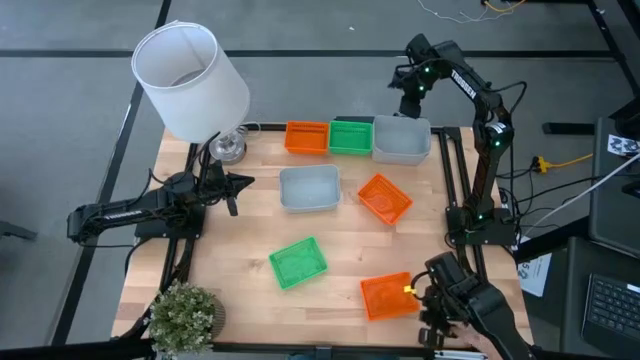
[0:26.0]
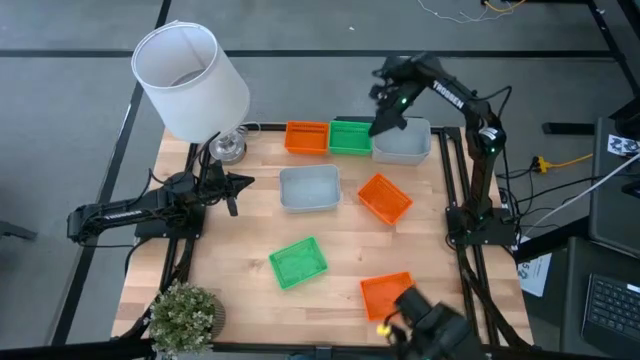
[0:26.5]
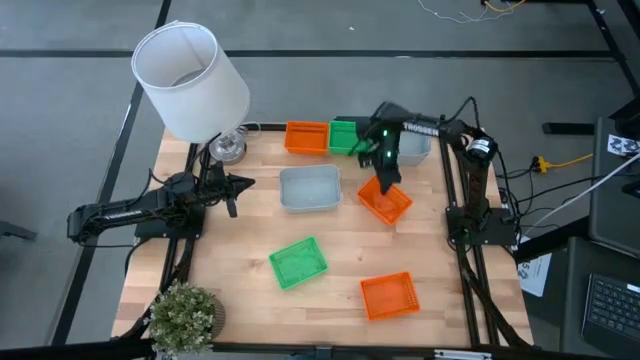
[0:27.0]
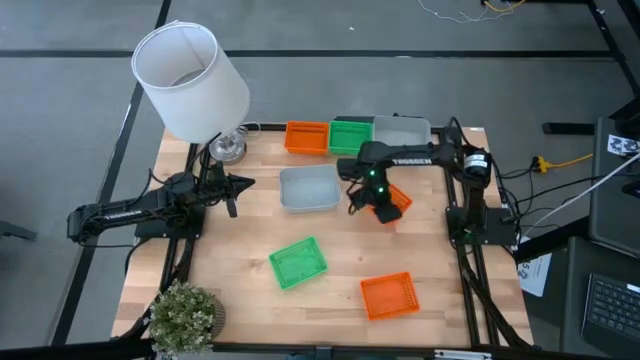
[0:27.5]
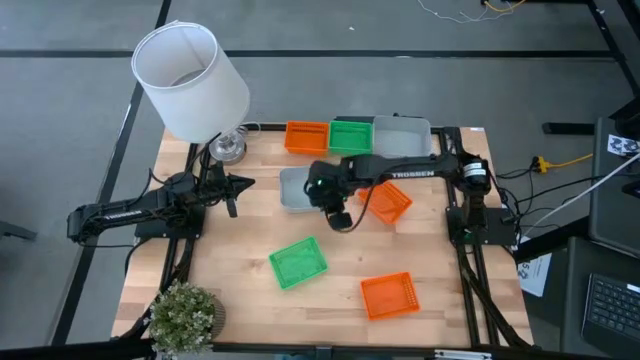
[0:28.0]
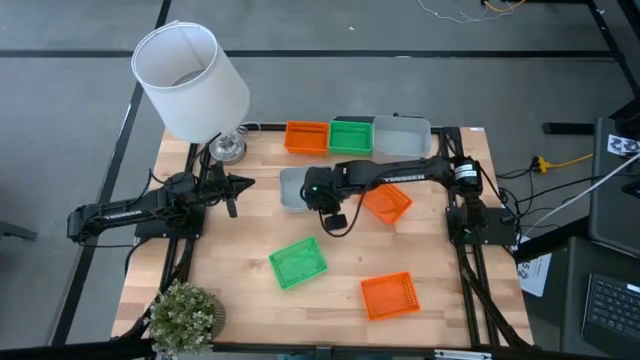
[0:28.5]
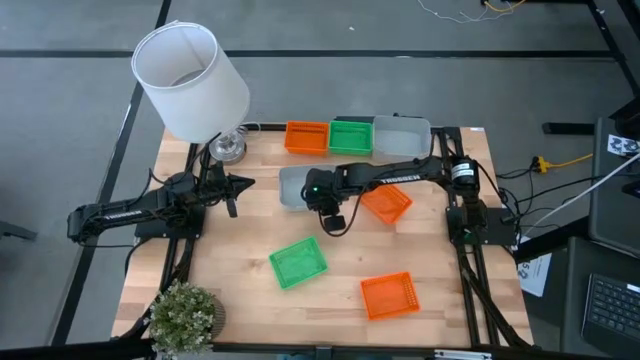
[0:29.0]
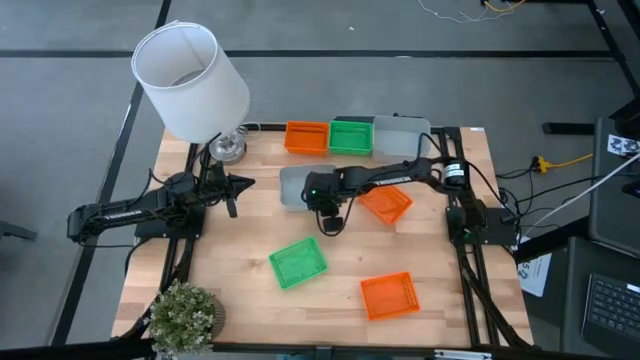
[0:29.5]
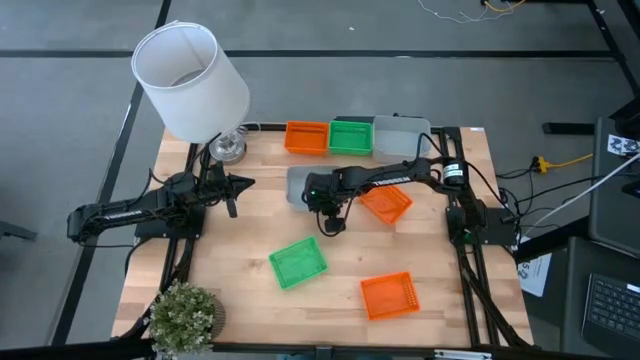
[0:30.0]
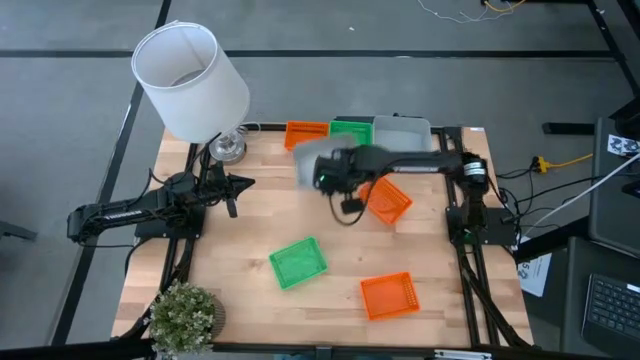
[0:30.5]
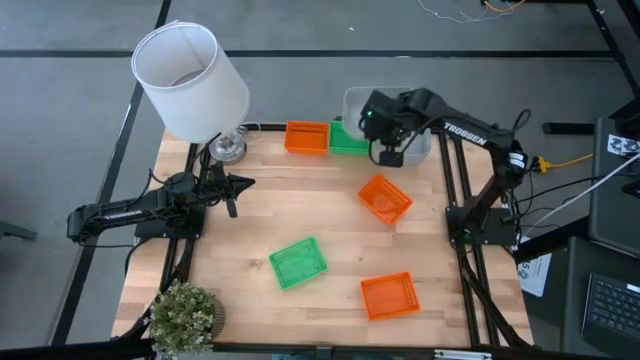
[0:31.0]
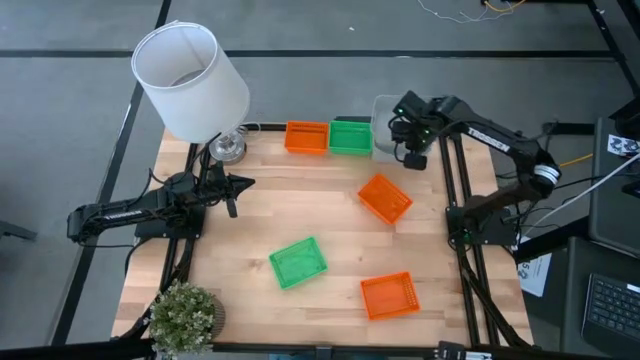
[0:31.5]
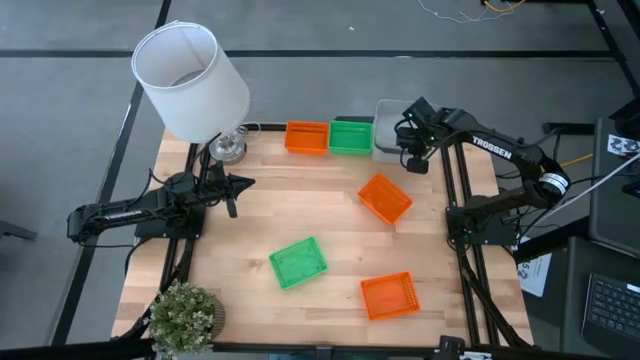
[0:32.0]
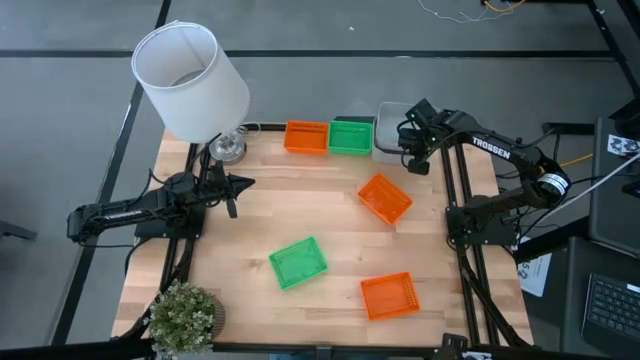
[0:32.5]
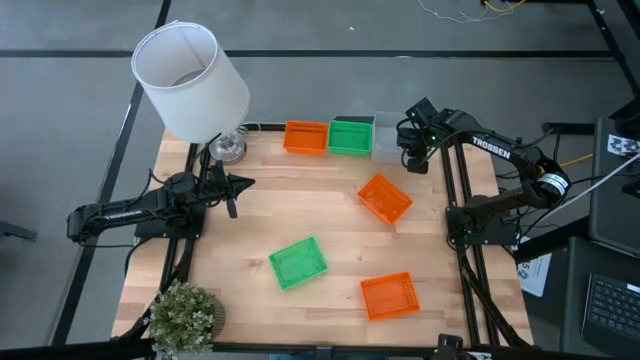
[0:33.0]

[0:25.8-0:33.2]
Stack the bottom gray bin on the top of the stacked gray bins

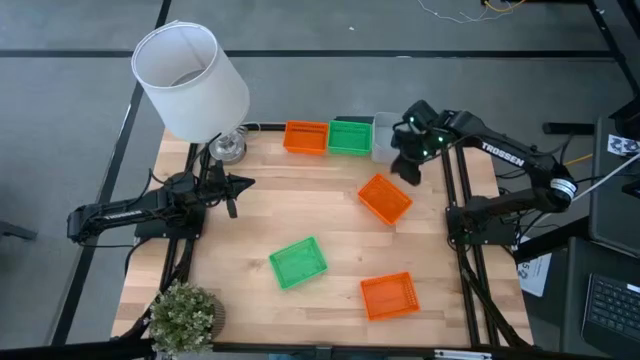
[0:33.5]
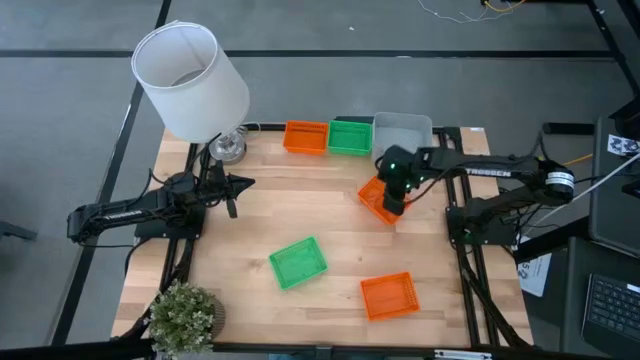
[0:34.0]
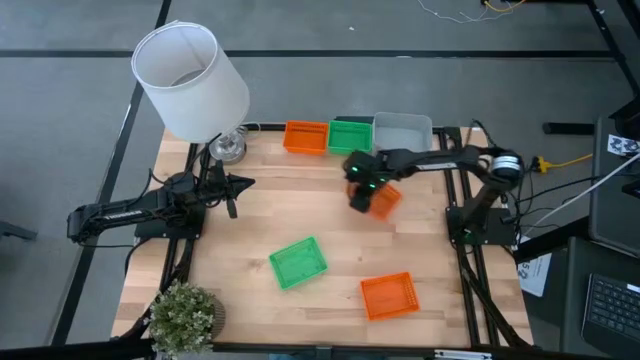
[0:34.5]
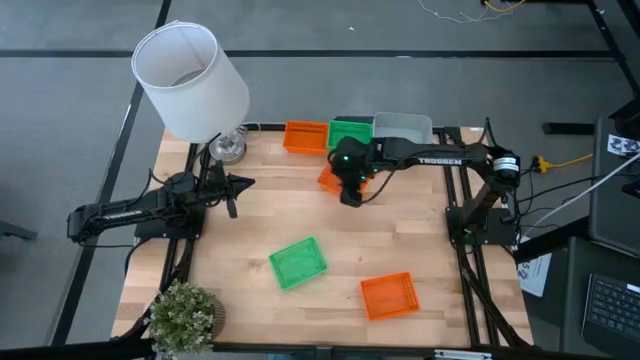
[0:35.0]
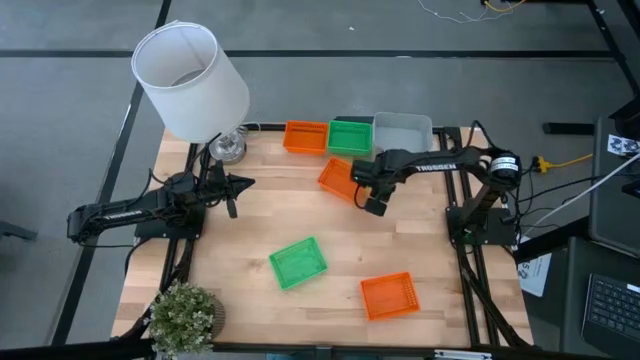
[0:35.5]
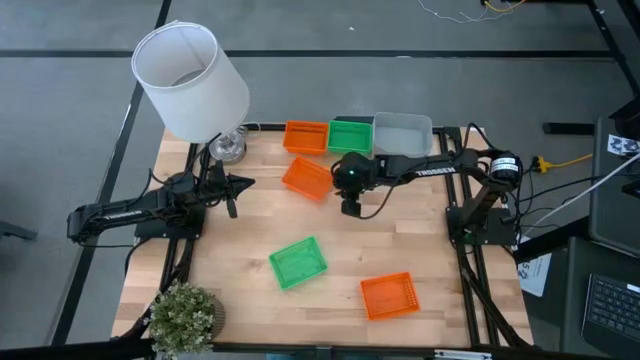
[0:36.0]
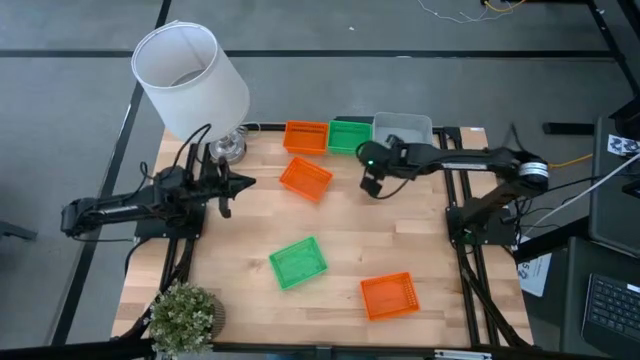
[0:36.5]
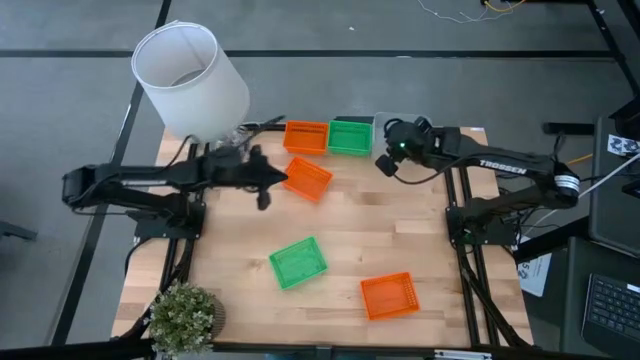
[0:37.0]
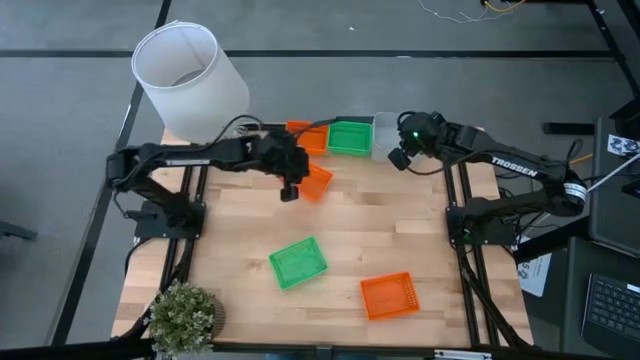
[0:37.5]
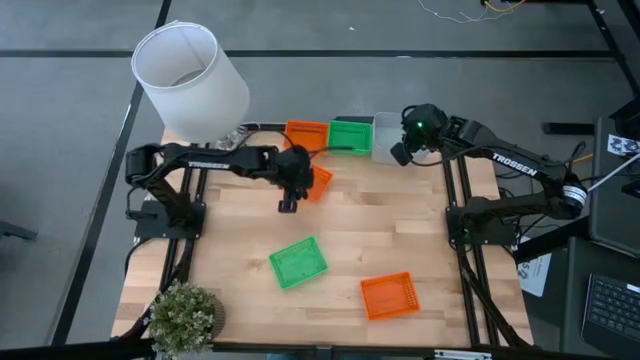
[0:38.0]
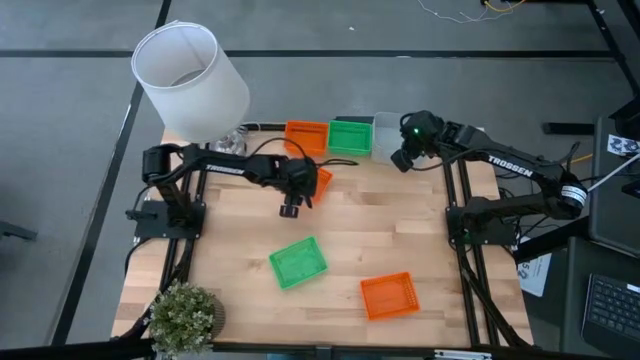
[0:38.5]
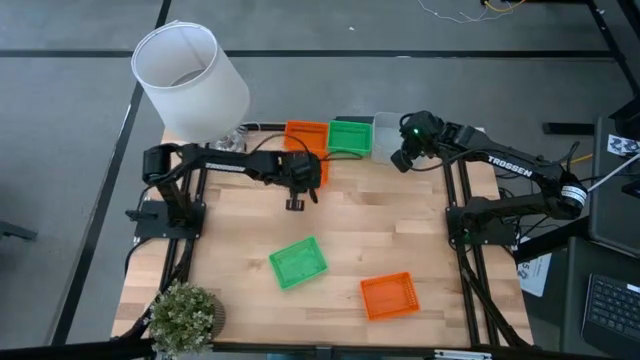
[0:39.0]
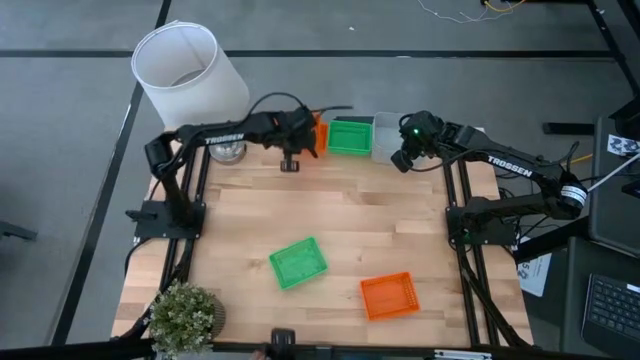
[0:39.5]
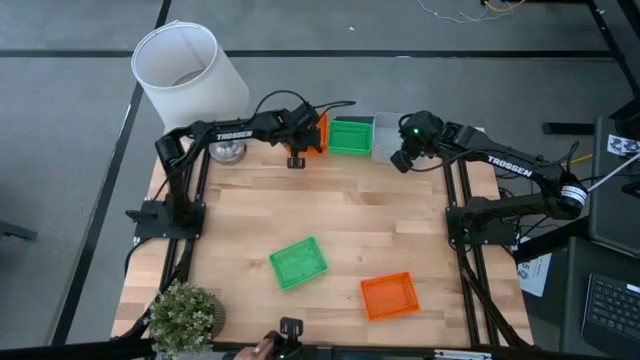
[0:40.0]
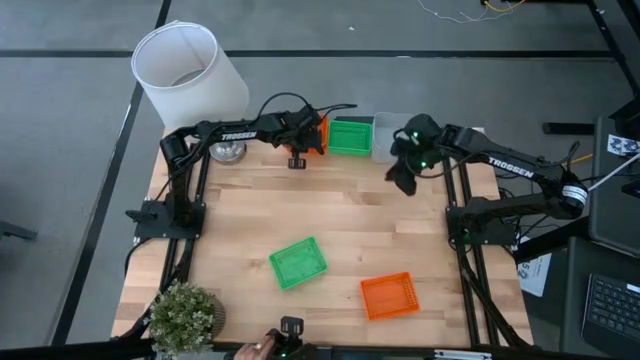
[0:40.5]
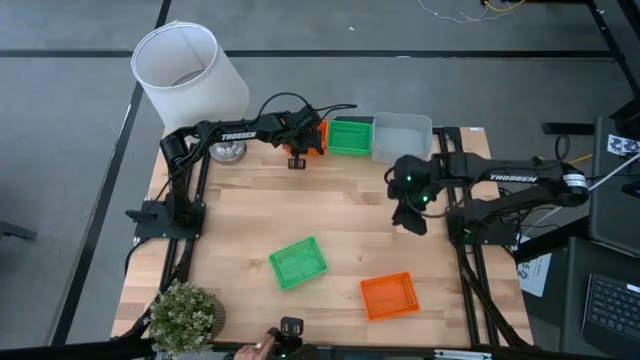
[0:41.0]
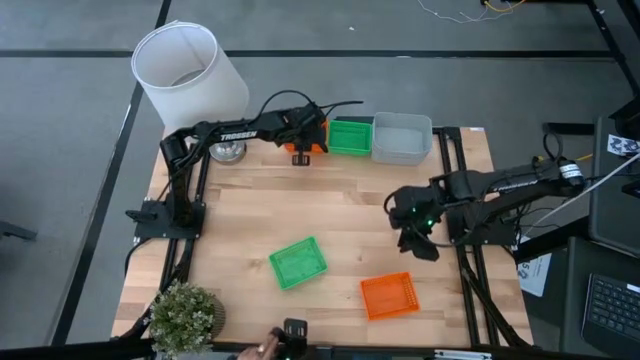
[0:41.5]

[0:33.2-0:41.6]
Stack the middle orange bin on the top orange bin

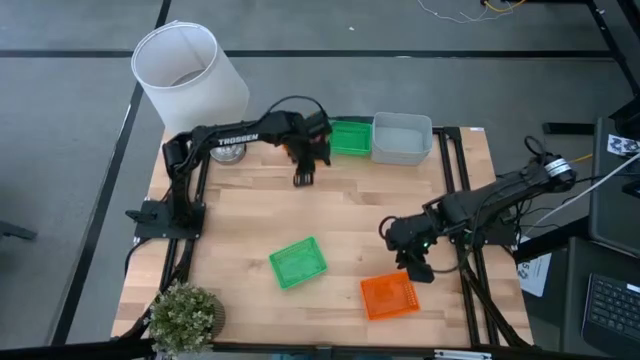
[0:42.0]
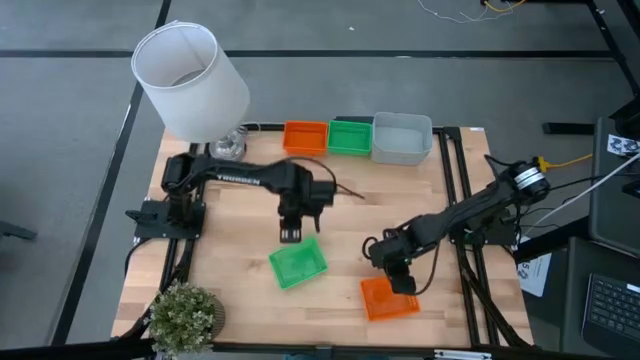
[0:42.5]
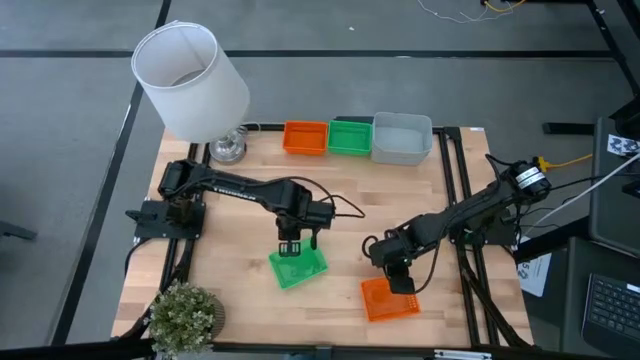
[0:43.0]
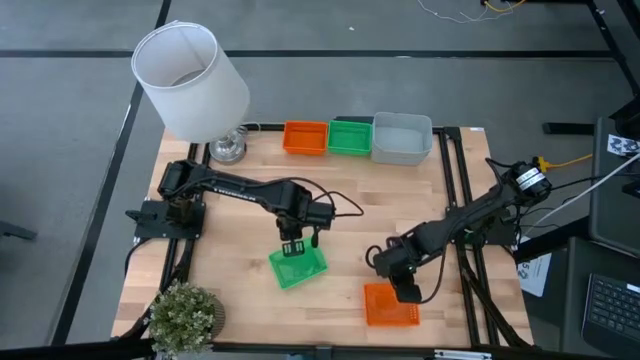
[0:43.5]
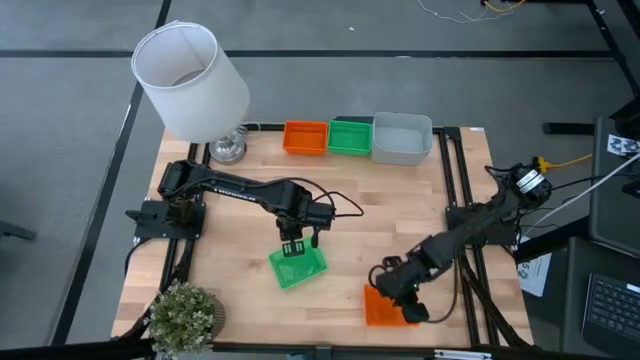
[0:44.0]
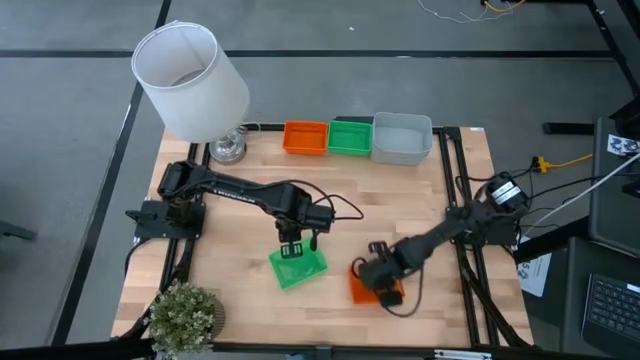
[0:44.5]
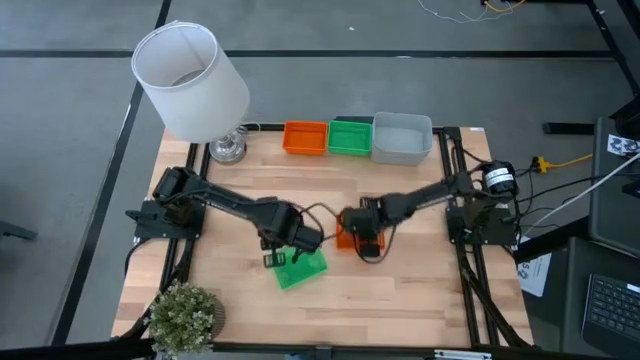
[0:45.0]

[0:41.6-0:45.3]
Move the orange bin to the center of the table

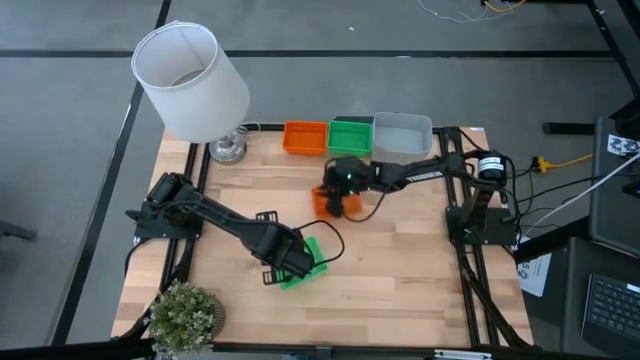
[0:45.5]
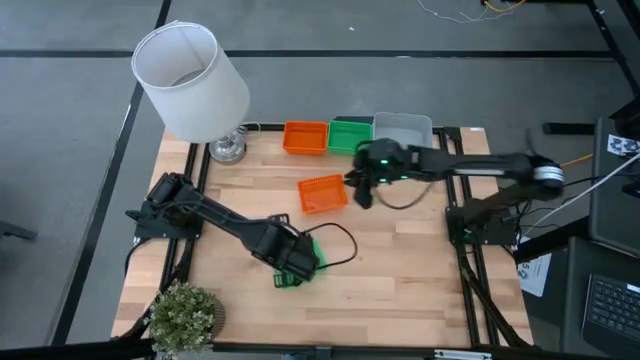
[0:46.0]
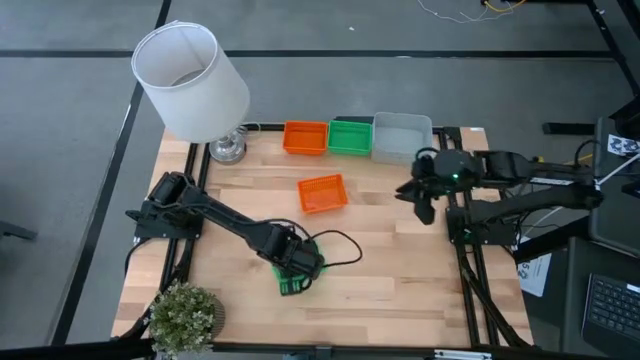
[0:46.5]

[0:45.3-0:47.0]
Move the bottom green bin to the center

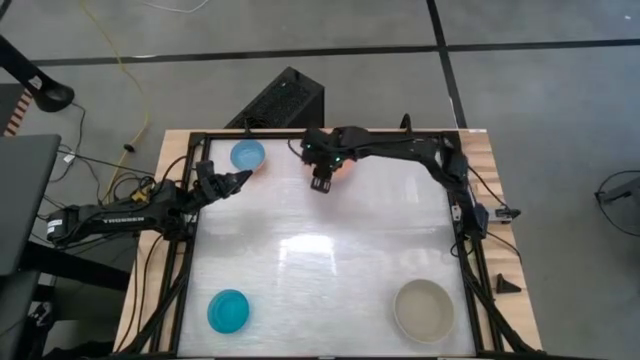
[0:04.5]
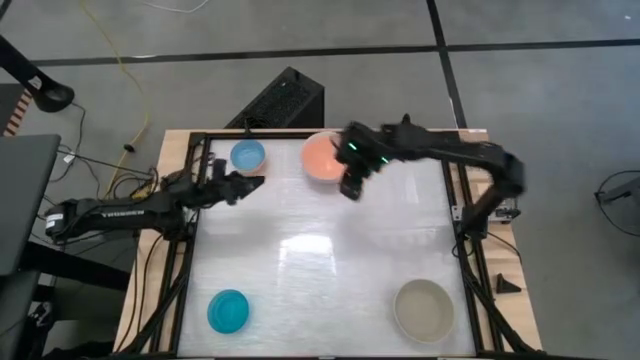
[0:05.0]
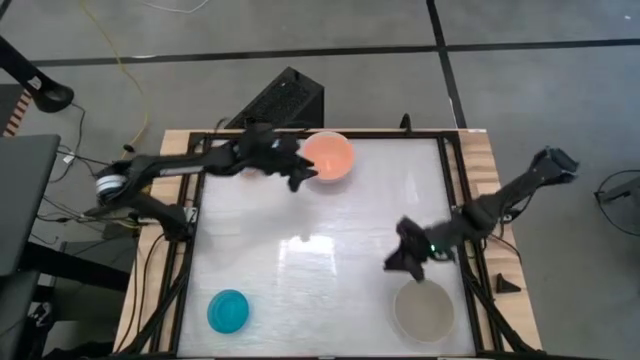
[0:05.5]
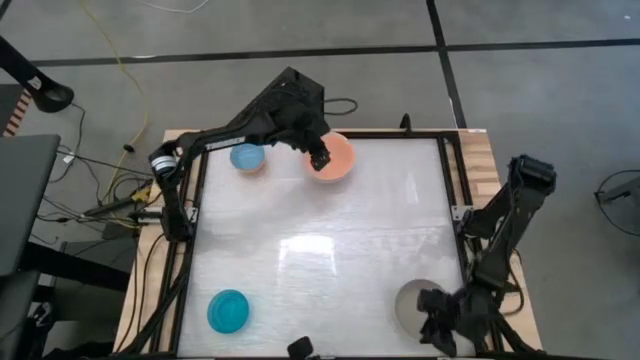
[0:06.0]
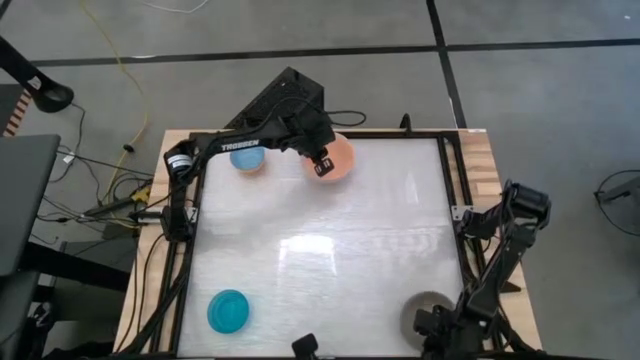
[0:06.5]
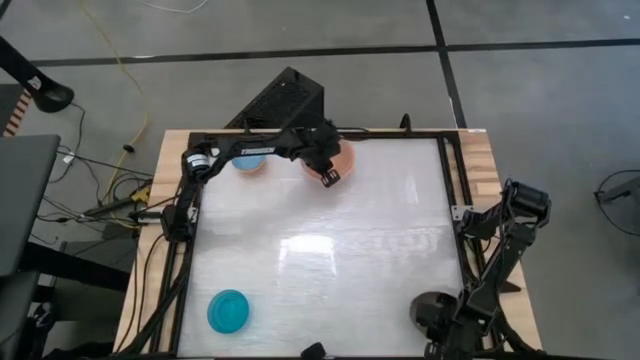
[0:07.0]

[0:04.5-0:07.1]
Stack the gray bowl into the light orange bowl
